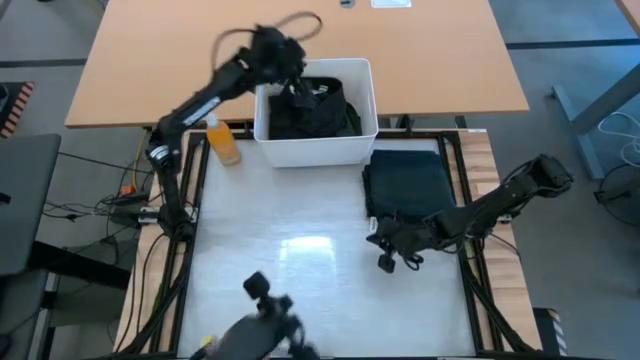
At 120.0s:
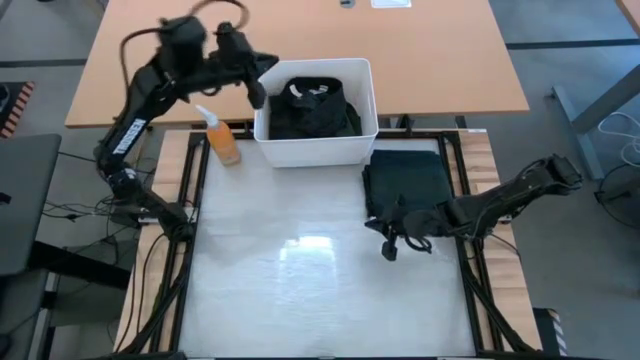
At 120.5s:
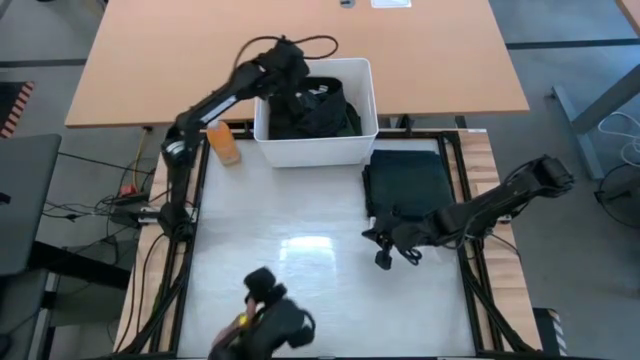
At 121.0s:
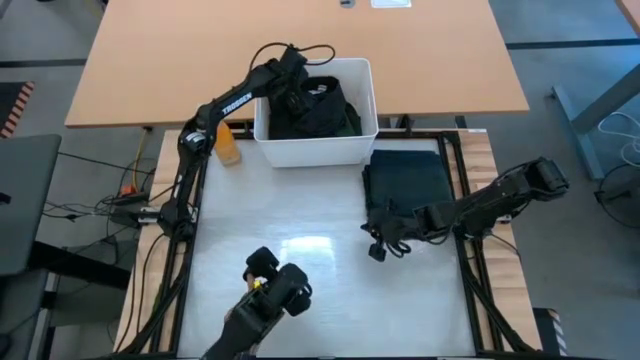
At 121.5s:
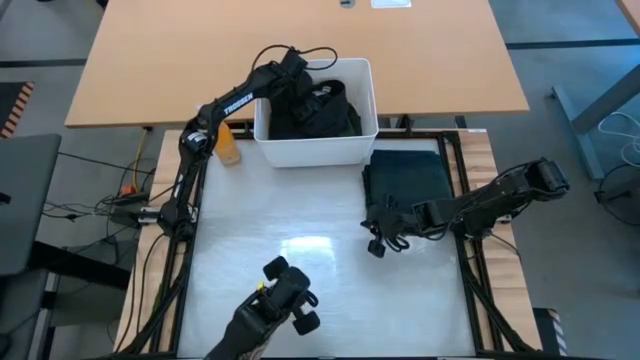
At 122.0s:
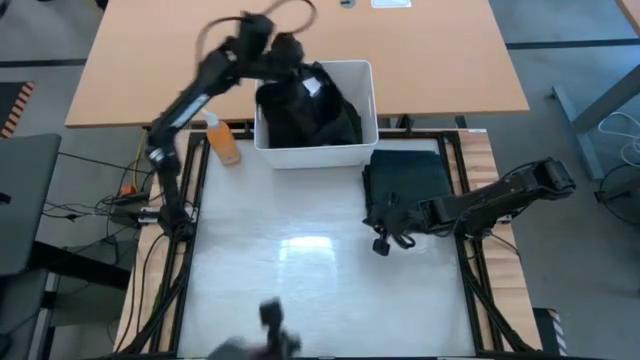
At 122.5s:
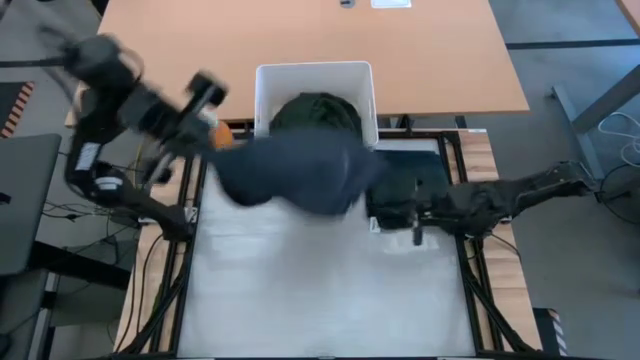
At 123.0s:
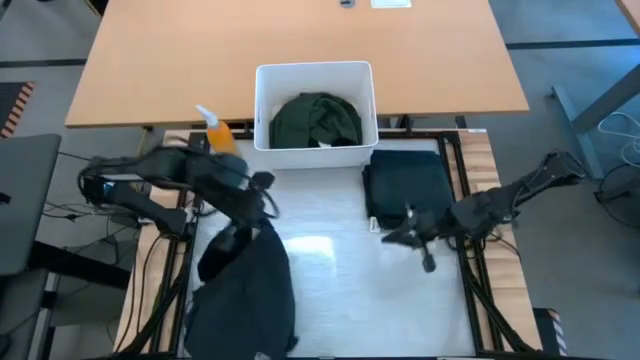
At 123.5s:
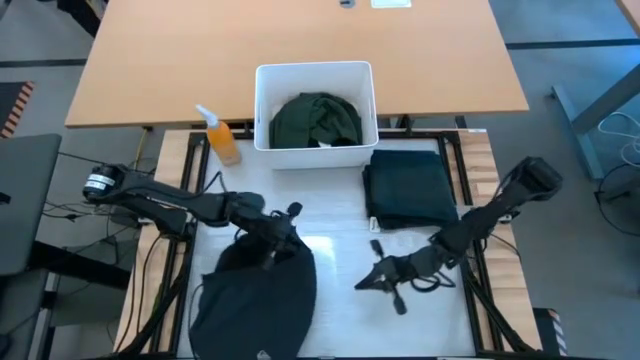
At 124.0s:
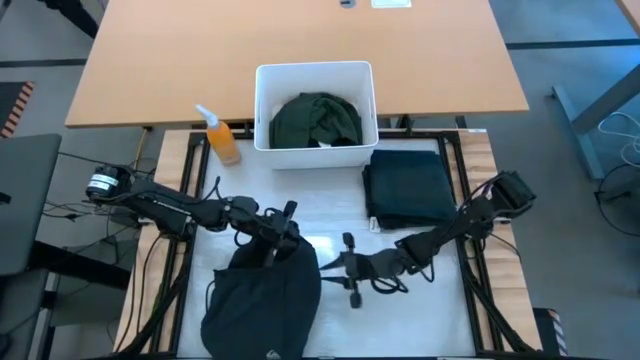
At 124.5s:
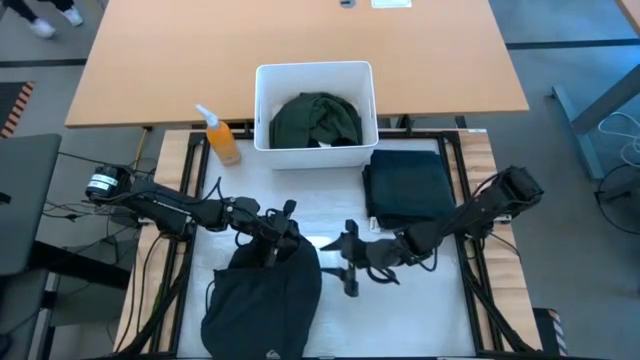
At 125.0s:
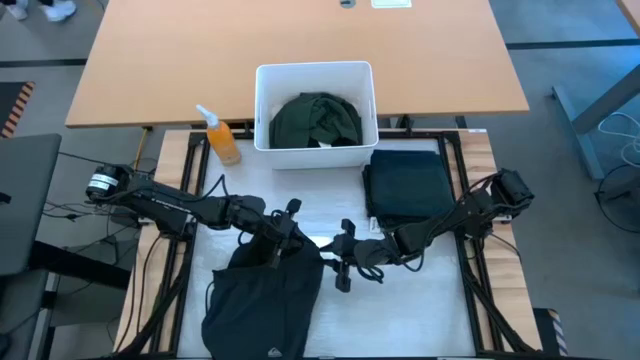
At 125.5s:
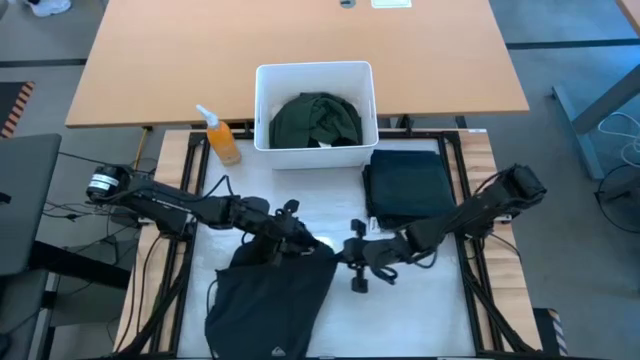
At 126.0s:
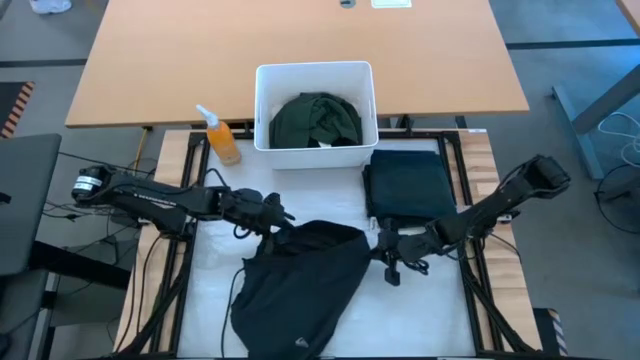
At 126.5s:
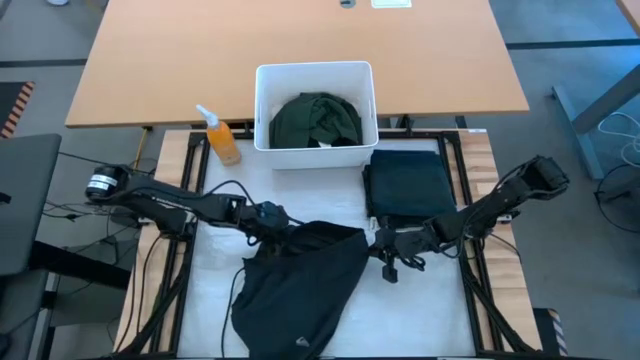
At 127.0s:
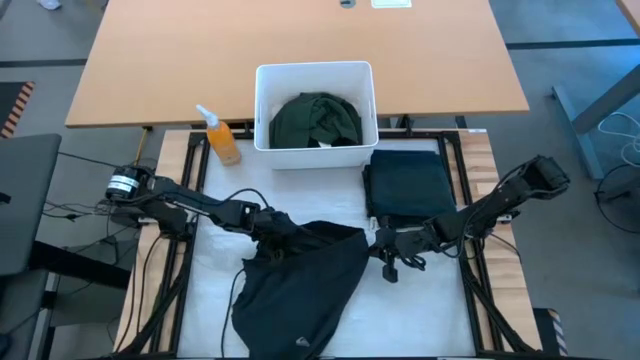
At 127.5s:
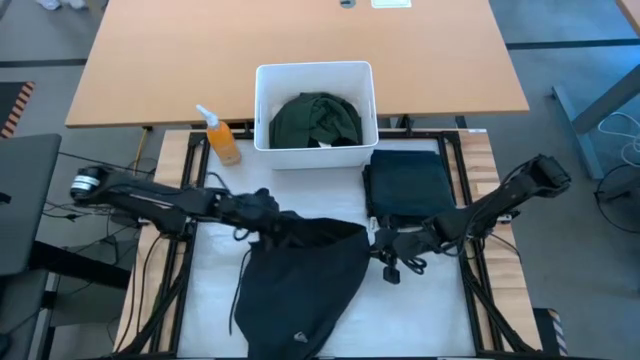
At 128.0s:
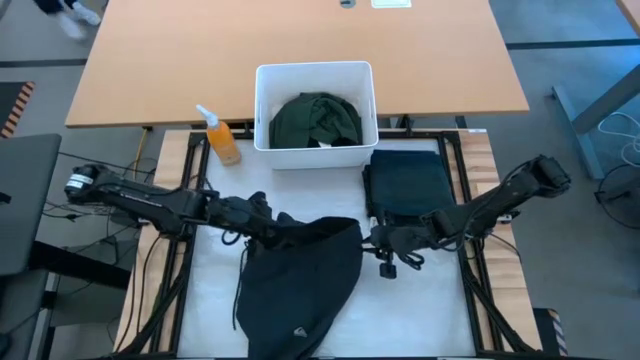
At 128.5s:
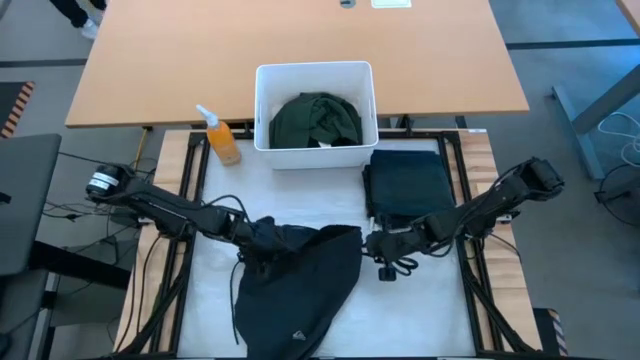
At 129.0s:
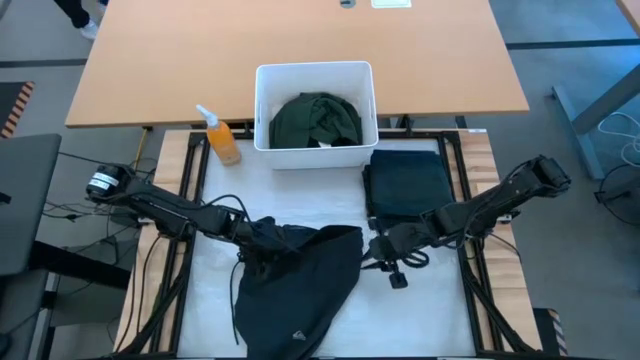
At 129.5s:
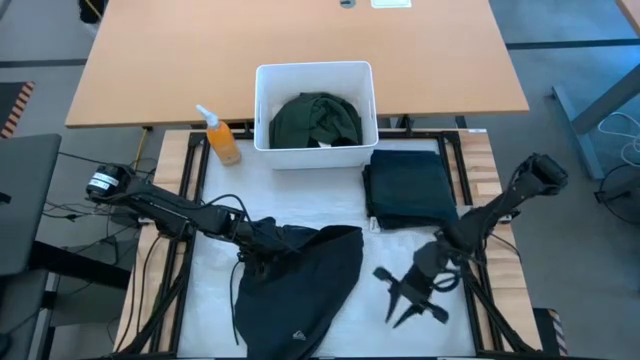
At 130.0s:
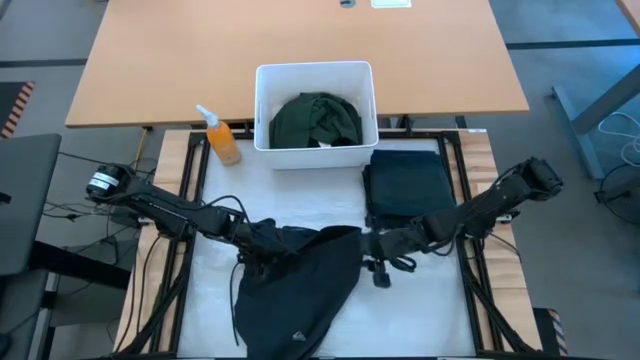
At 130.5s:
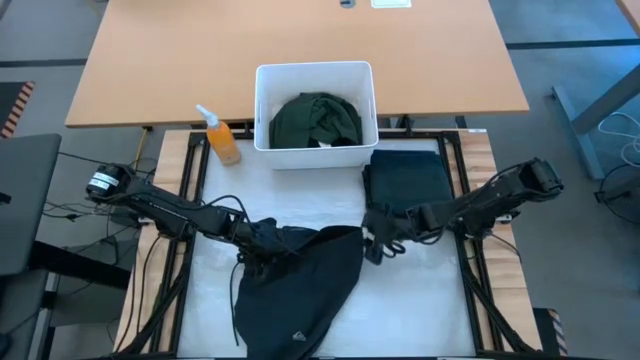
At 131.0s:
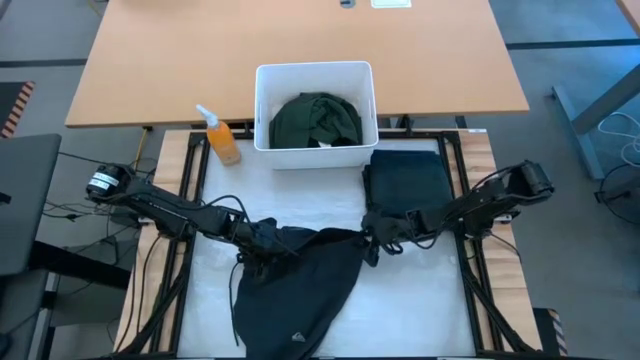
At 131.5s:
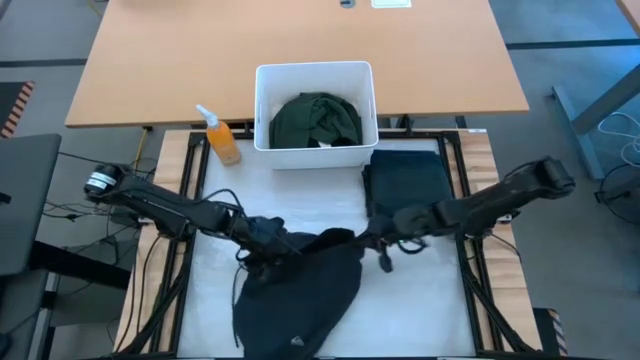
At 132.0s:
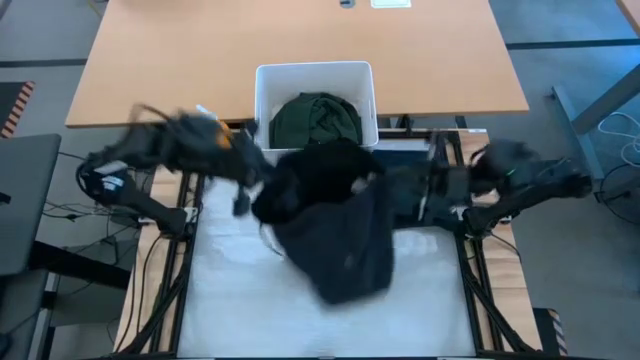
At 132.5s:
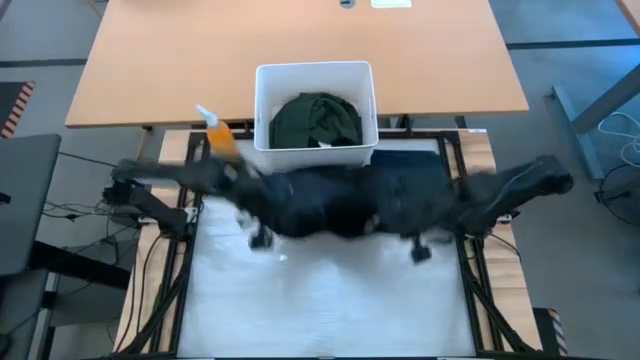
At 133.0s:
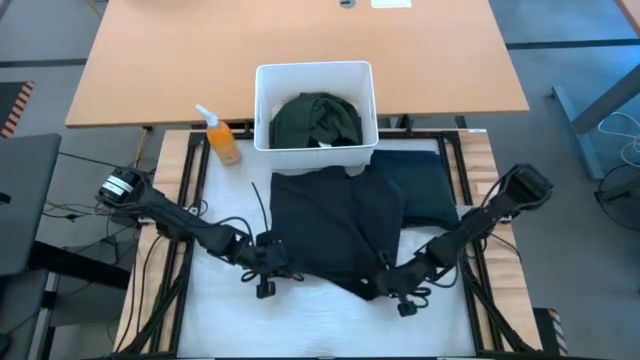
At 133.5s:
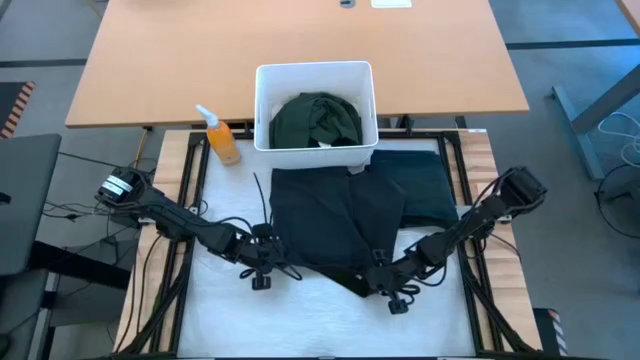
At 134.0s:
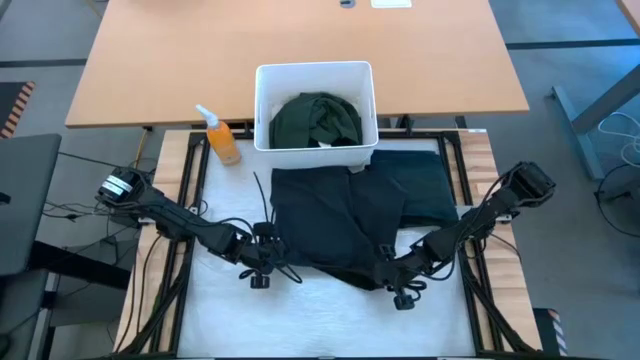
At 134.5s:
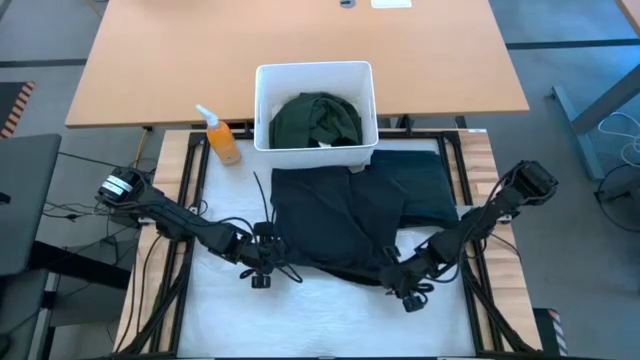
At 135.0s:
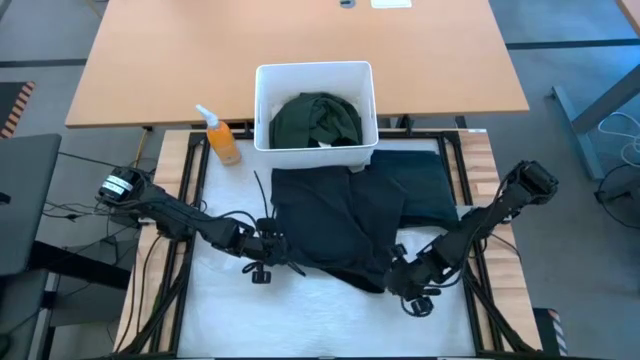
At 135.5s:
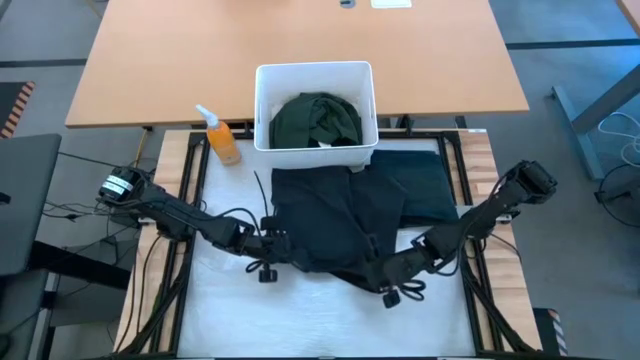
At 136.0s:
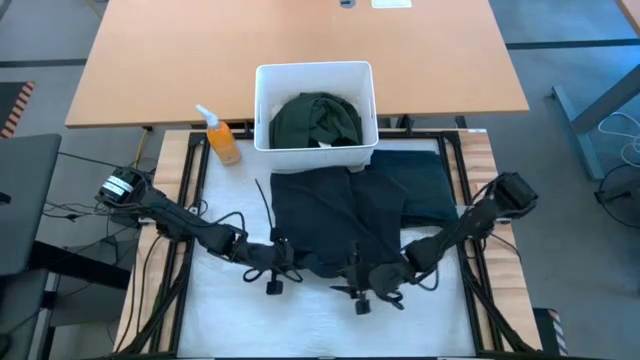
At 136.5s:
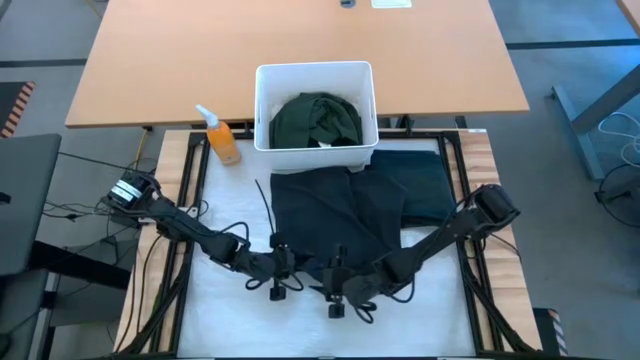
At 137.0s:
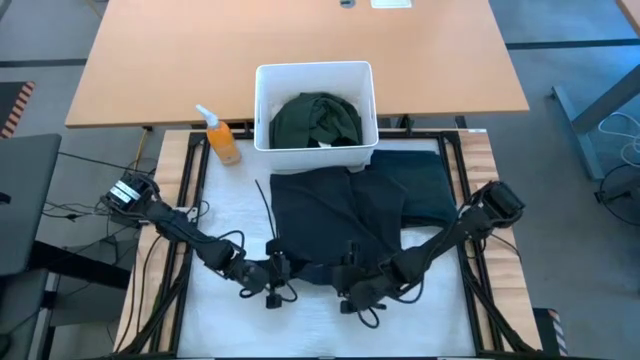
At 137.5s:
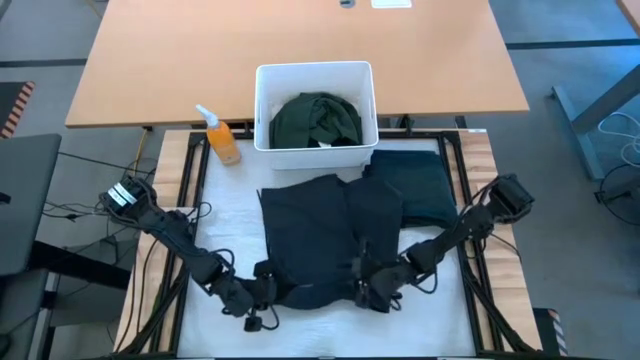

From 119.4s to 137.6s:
Task: Fold laundry
Fold the black shorts from the white laundry organizer

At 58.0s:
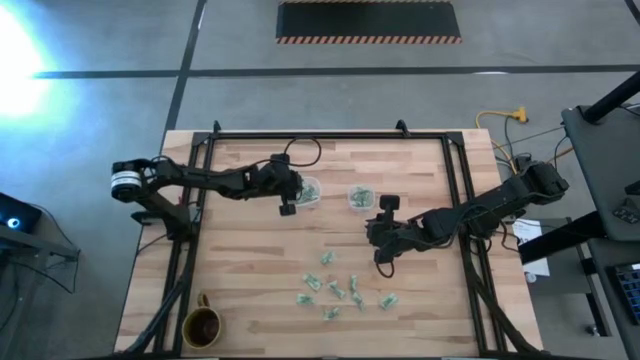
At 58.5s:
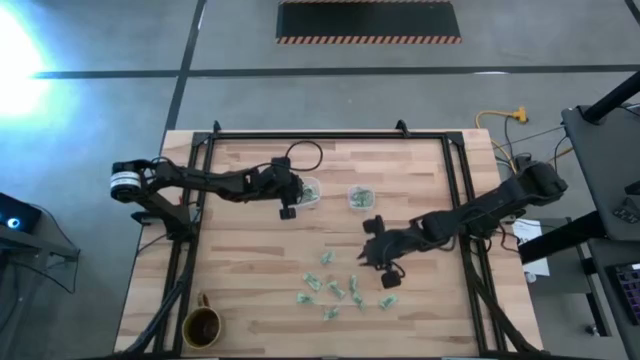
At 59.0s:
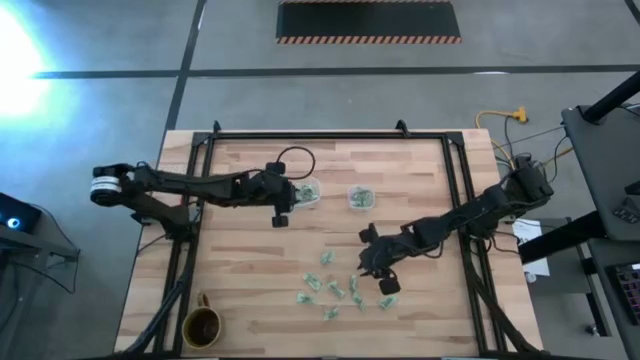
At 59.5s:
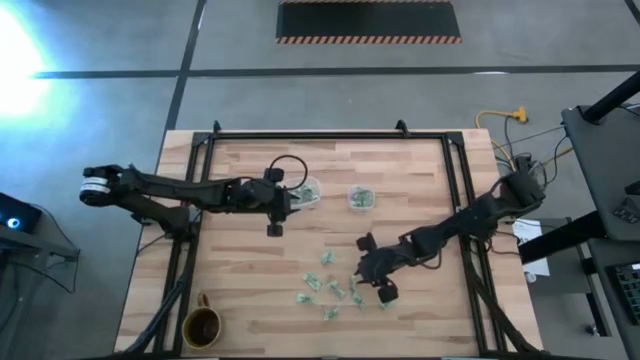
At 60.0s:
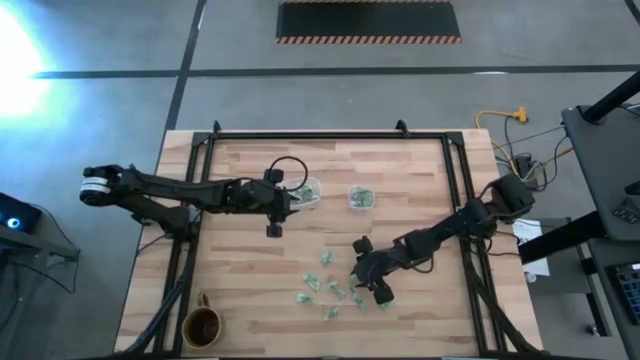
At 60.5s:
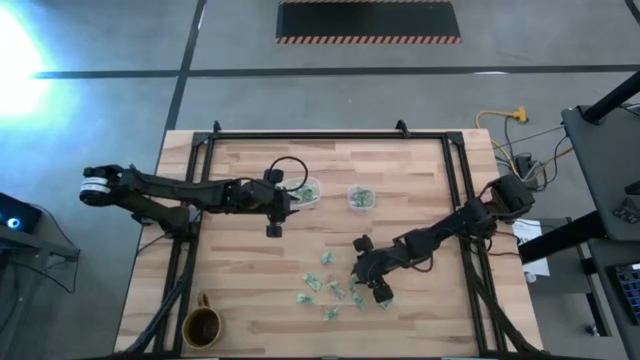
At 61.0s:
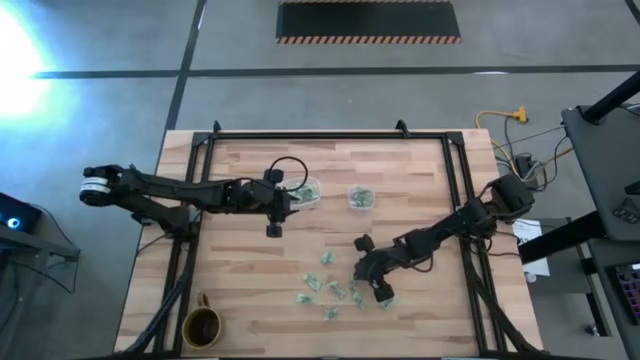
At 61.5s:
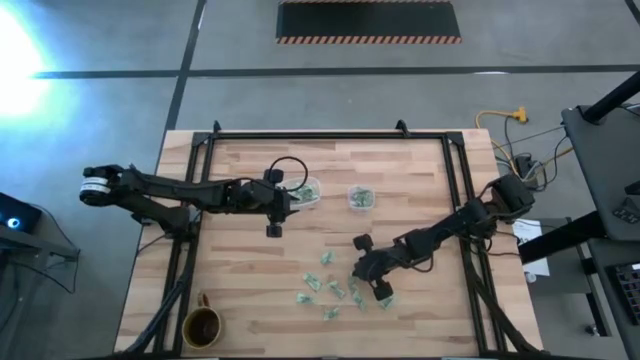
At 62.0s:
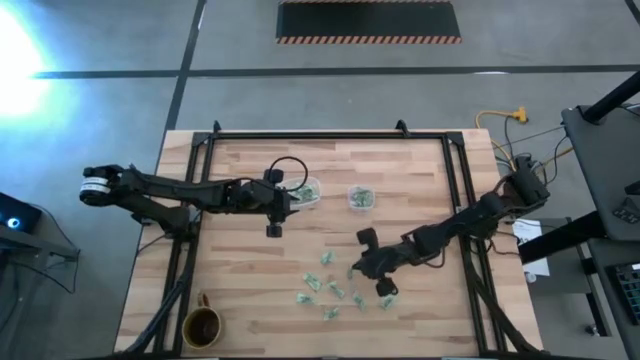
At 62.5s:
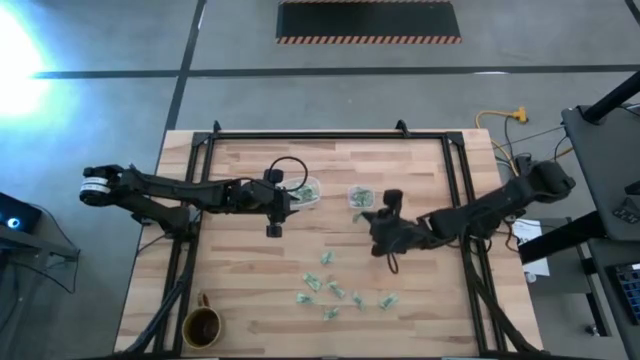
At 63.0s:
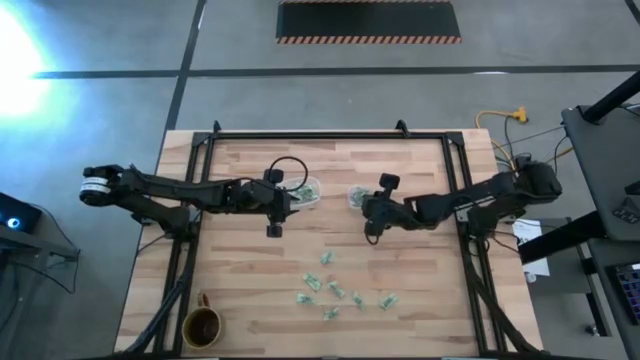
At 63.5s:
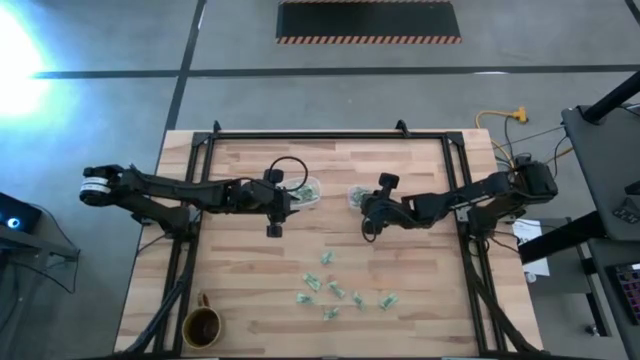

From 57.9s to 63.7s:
Task: Pick and place Stevia / Truvia into bins
Put the stevia packet into the transparent square container
